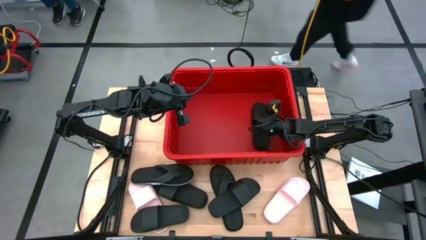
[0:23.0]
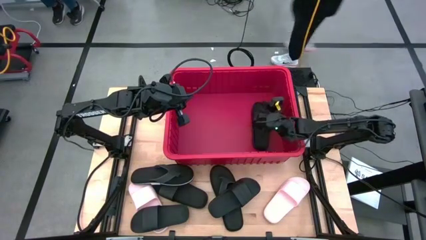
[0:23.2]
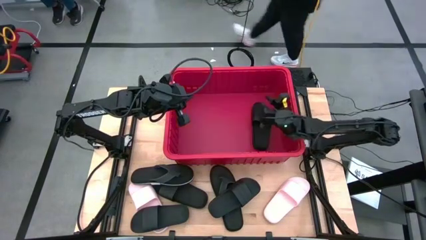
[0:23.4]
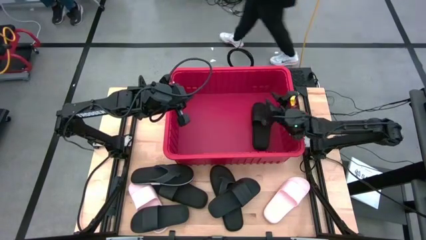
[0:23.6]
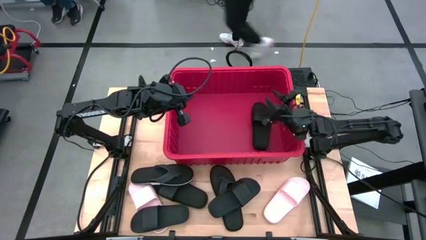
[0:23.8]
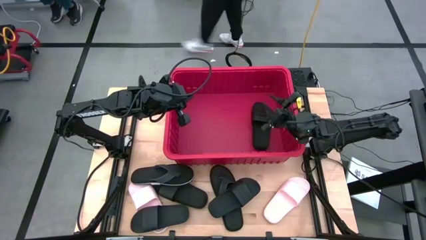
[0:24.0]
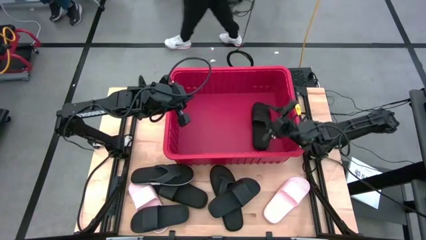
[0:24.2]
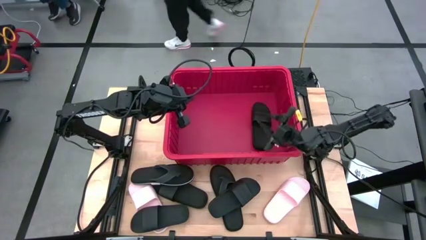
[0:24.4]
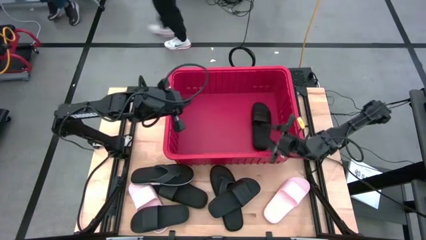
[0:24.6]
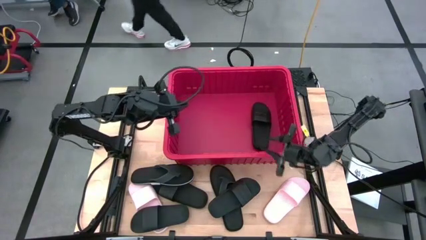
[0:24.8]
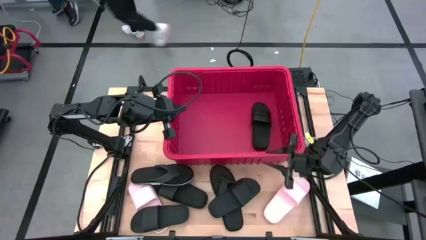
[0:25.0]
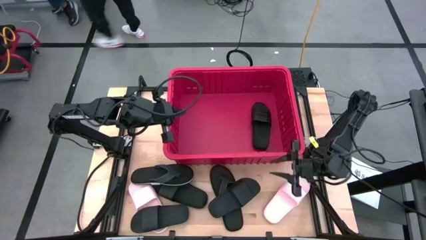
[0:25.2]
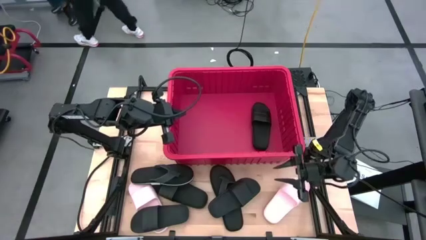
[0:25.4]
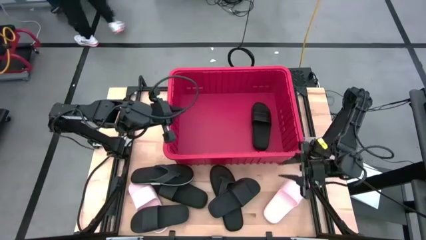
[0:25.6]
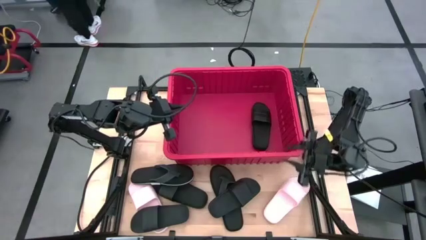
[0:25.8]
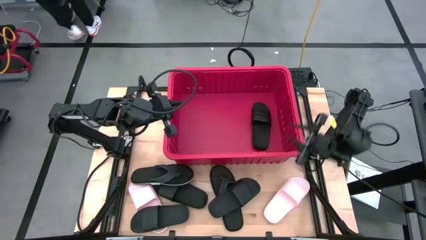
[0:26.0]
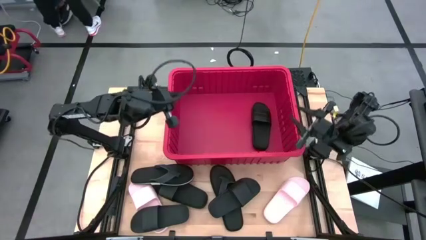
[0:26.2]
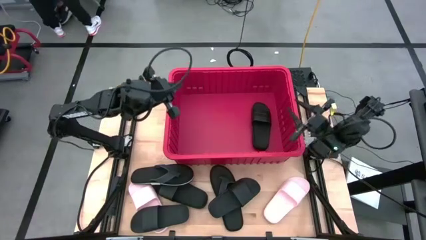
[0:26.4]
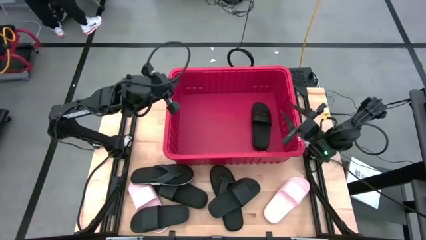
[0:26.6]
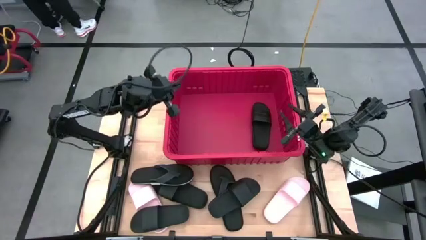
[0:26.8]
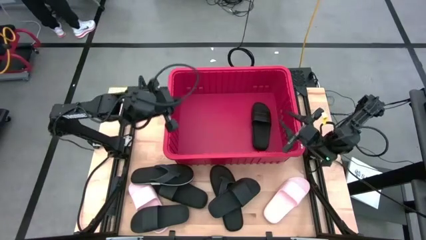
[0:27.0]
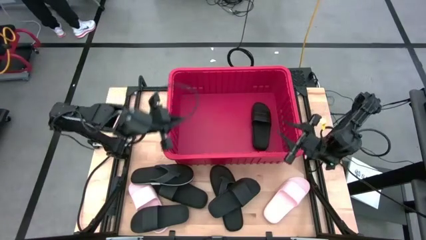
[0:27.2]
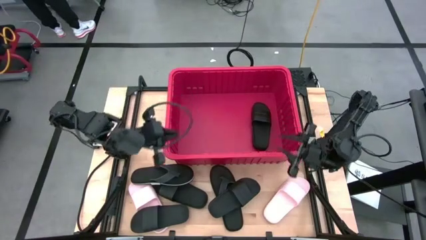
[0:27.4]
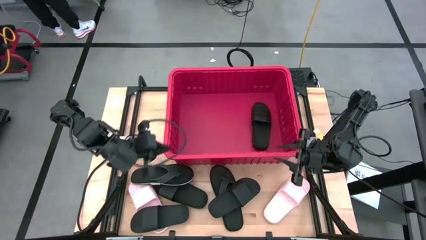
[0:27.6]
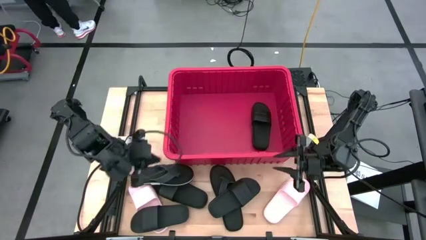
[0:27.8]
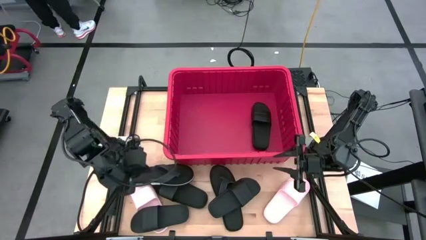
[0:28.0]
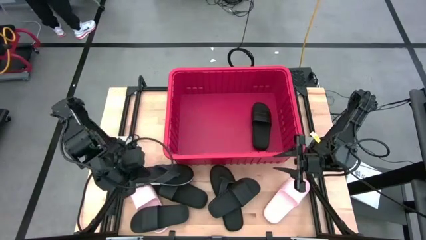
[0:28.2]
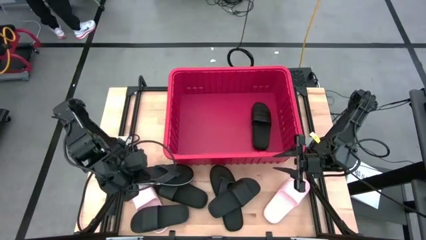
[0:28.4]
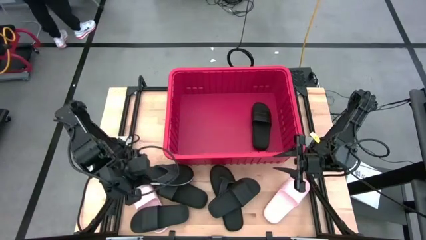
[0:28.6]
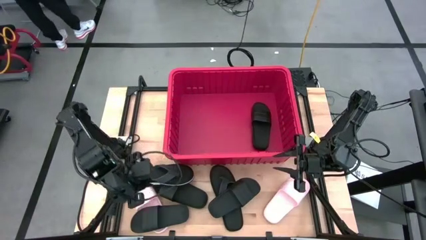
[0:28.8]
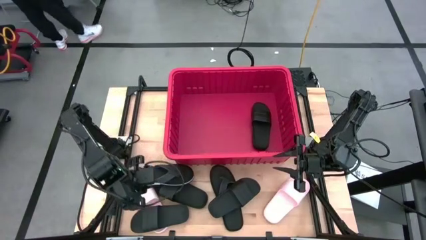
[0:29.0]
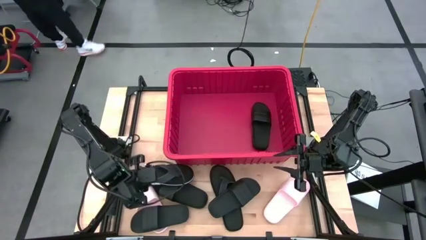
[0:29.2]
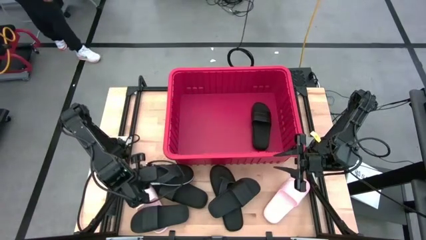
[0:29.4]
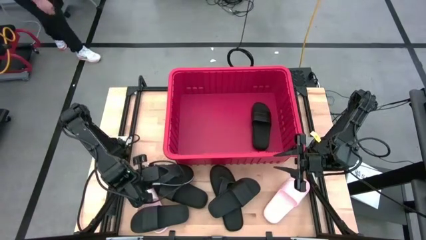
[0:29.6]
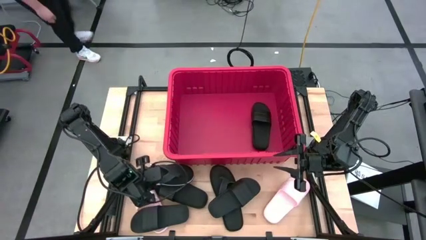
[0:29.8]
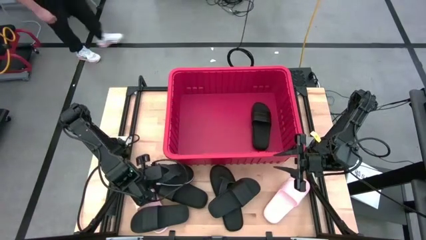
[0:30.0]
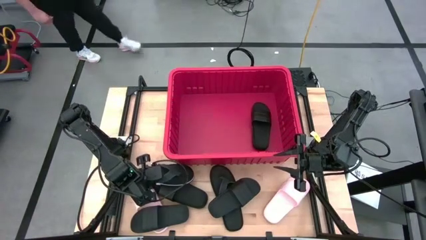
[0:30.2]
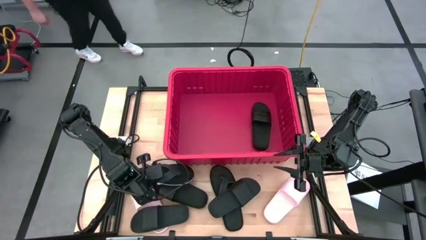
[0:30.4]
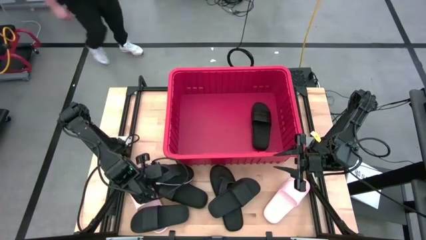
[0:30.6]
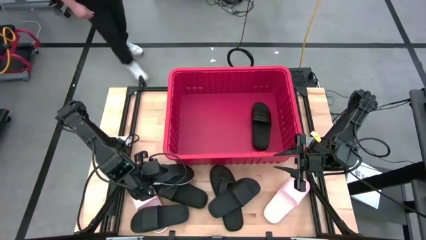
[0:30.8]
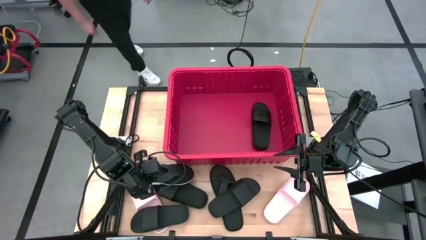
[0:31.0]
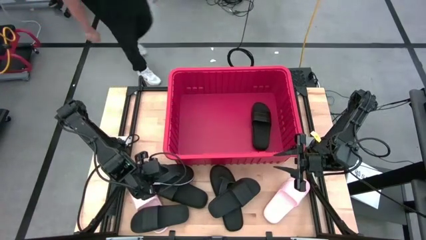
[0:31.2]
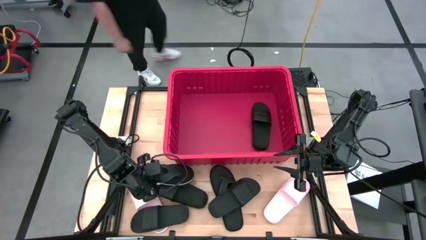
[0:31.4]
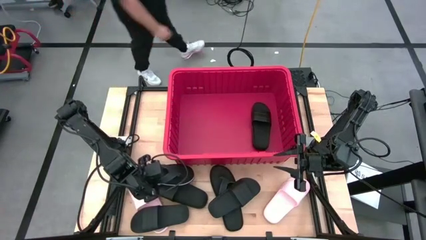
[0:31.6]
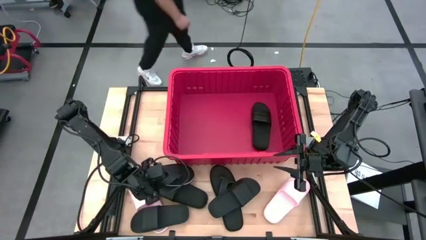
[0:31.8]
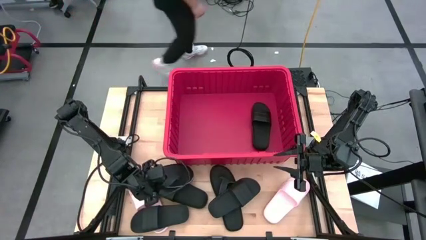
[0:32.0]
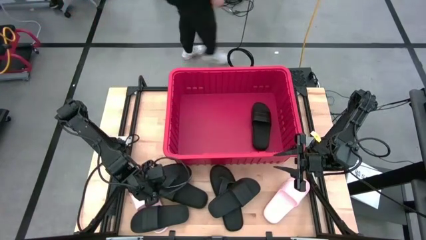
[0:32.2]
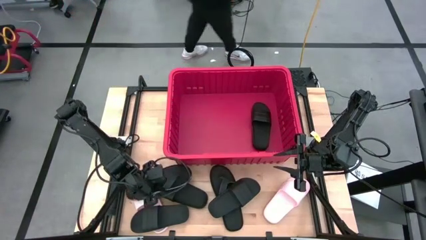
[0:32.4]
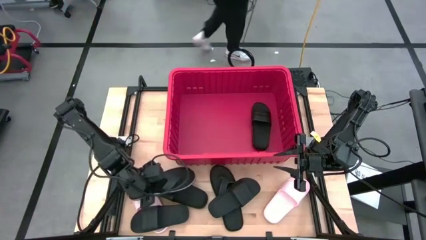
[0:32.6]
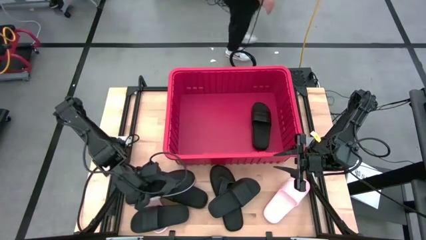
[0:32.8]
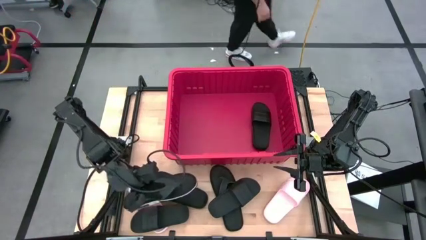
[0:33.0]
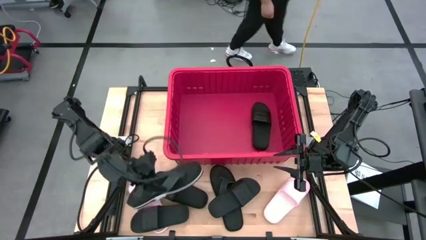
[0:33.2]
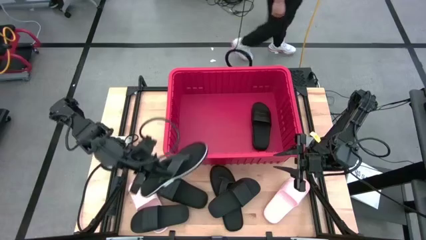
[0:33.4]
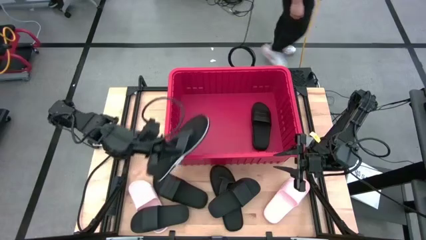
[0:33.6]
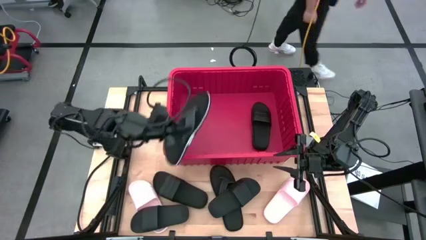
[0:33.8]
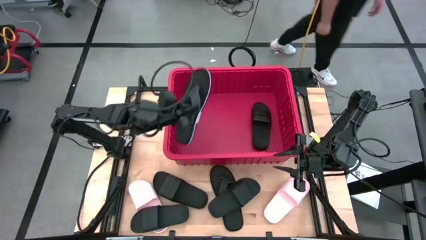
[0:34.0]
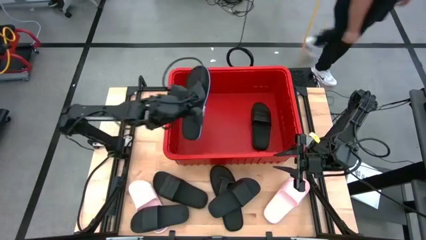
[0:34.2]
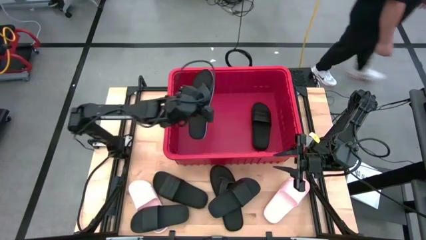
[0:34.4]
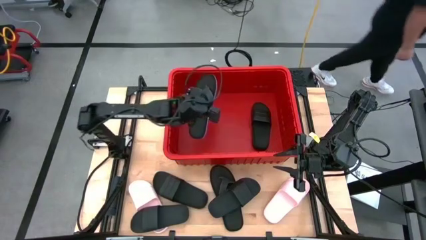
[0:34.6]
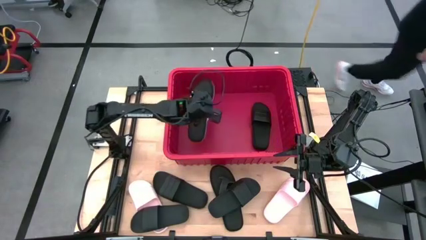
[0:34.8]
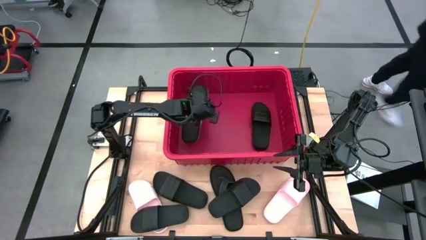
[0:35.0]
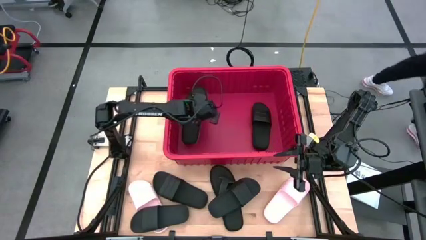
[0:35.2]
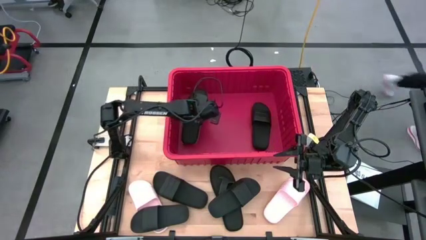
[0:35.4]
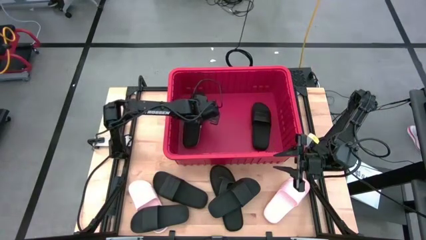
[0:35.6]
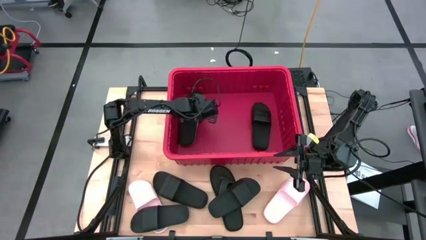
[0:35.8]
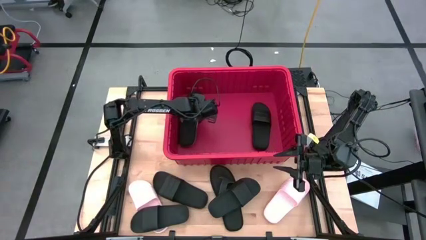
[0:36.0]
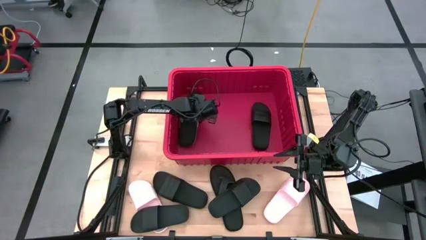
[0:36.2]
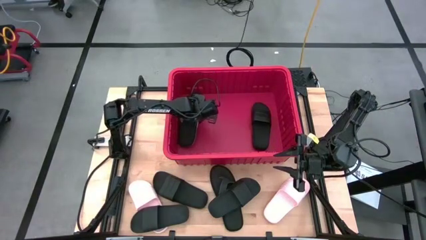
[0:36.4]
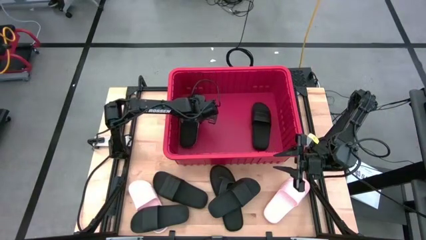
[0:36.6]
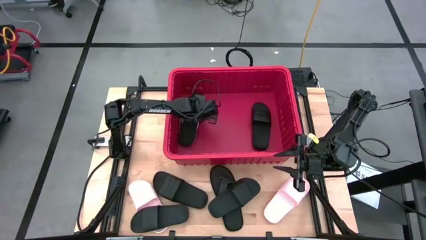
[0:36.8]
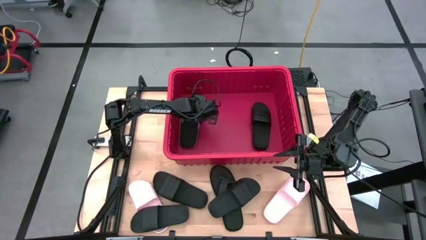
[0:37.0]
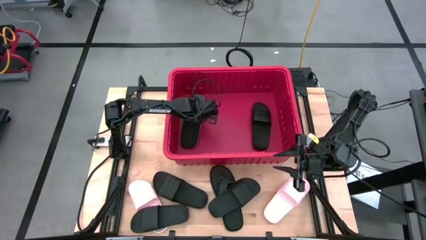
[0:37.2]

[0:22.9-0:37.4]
Task: Pick and place slides into bin
Put the black slipper into the red bin

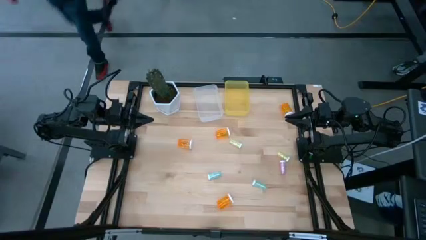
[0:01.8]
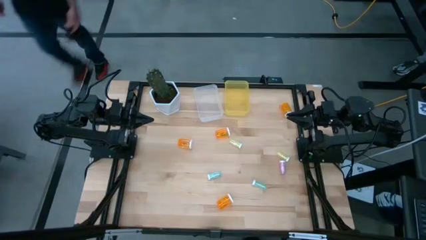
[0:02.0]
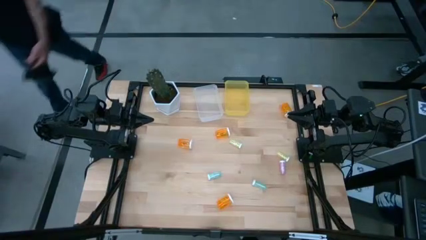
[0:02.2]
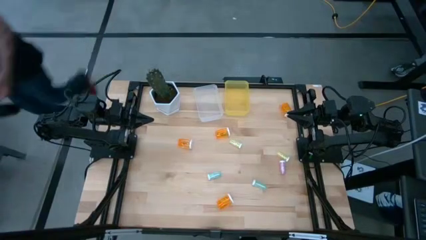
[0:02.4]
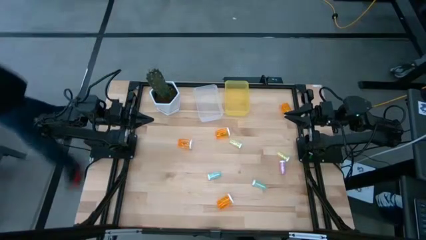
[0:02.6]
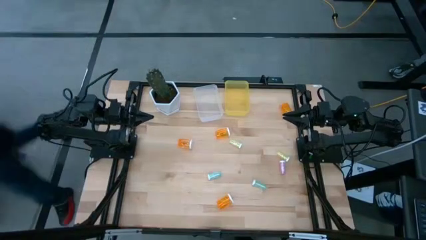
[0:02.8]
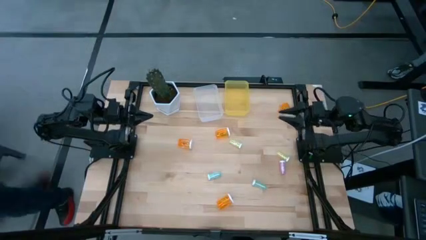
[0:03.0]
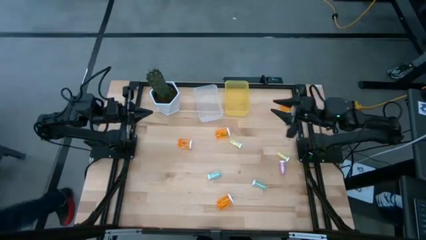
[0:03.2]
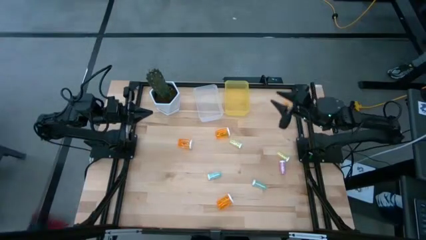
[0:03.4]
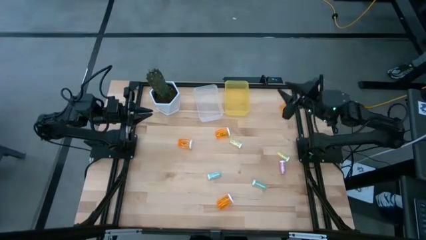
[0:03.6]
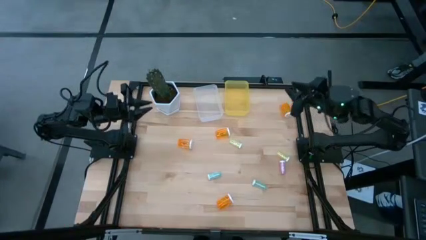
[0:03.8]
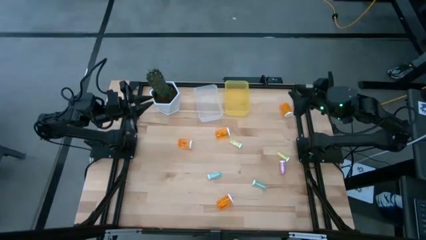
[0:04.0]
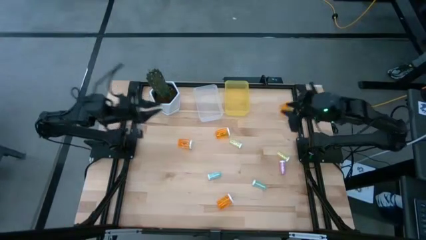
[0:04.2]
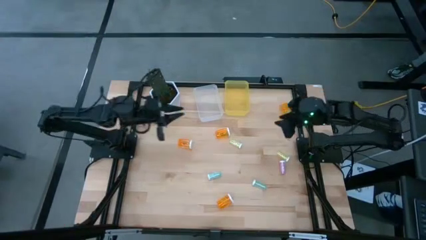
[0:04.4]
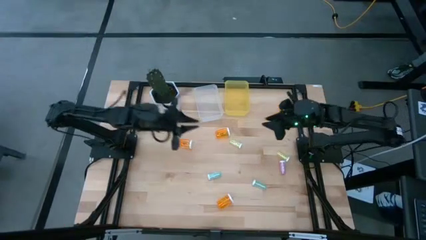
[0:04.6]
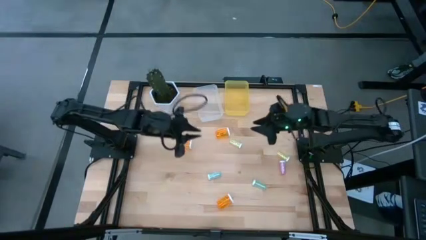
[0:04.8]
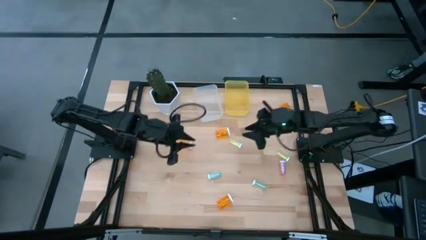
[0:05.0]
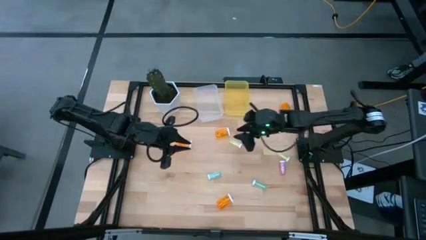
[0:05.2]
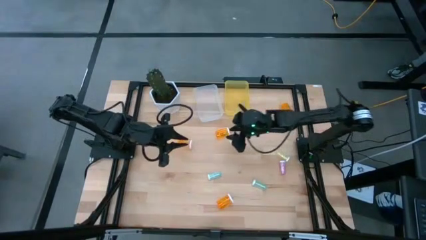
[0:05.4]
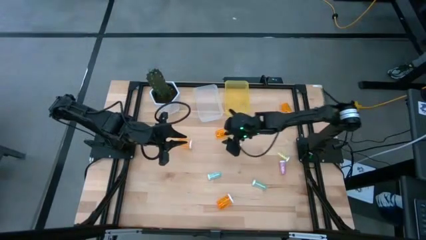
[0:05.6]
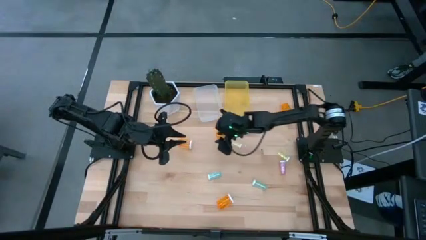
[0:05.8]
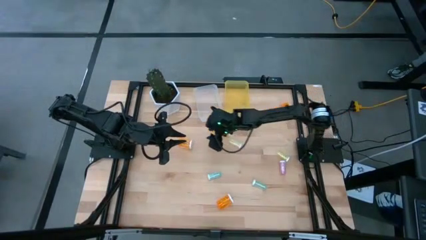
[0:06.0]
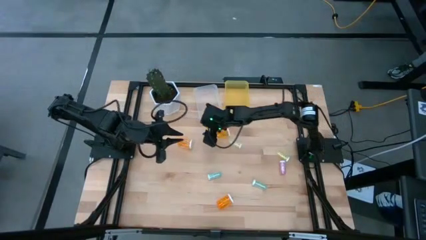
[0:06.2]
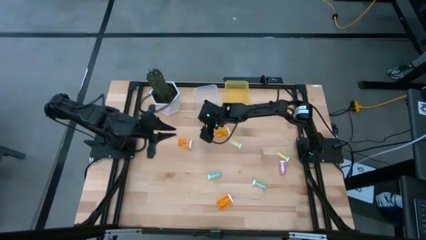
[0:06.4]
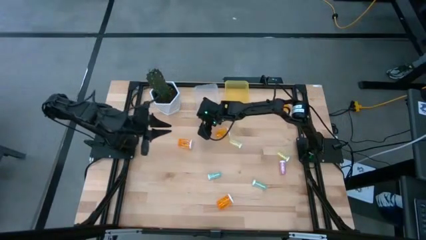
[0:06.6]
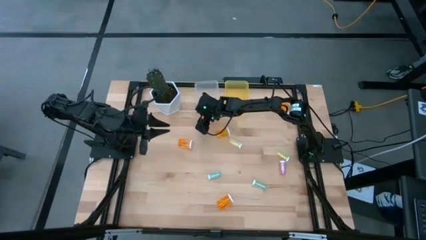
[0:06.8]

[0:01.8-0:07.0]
Task: Pick and place medicine bottles into bin by pill shape (circle, oval)
Prepare the white bin
